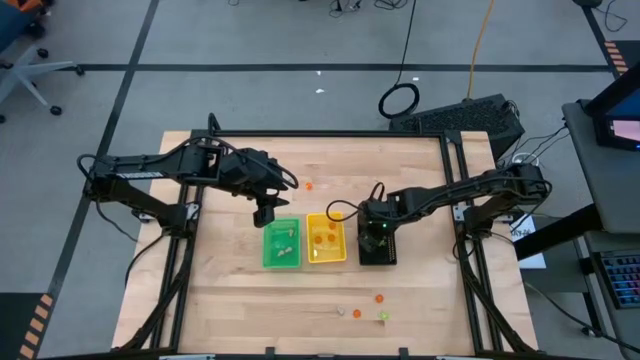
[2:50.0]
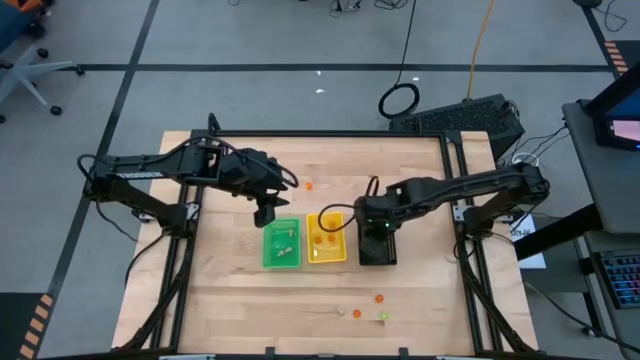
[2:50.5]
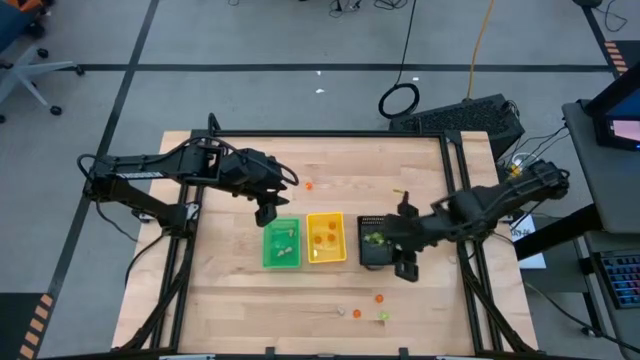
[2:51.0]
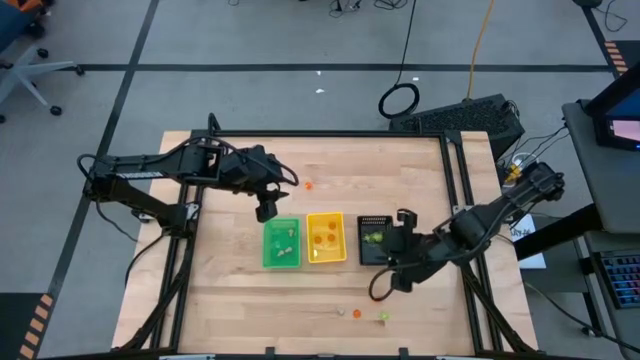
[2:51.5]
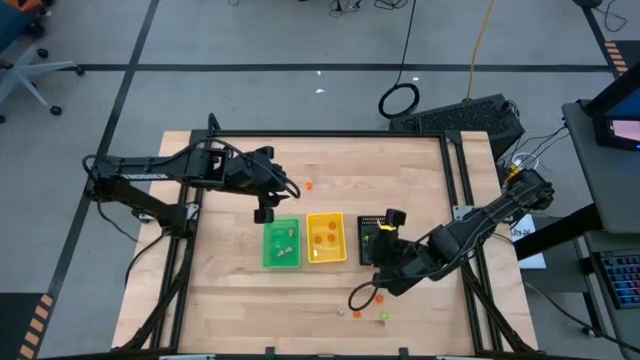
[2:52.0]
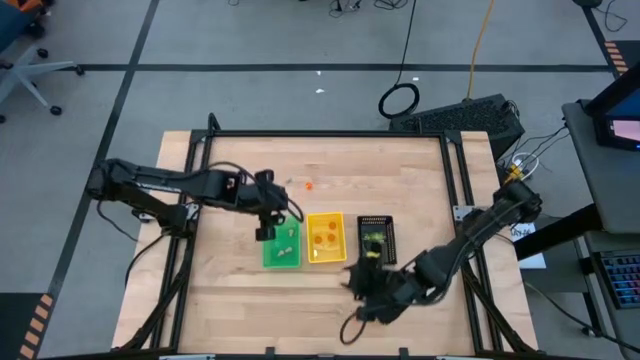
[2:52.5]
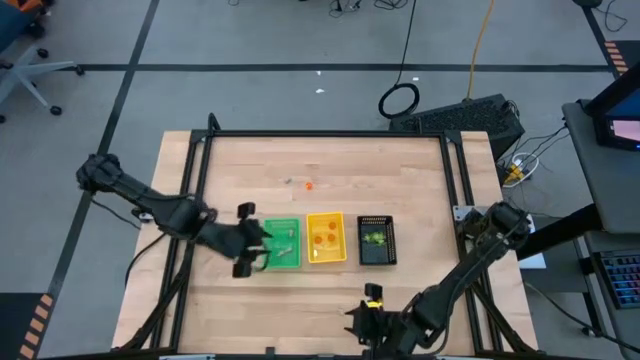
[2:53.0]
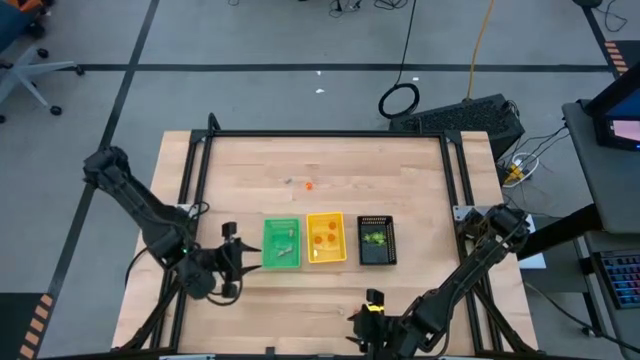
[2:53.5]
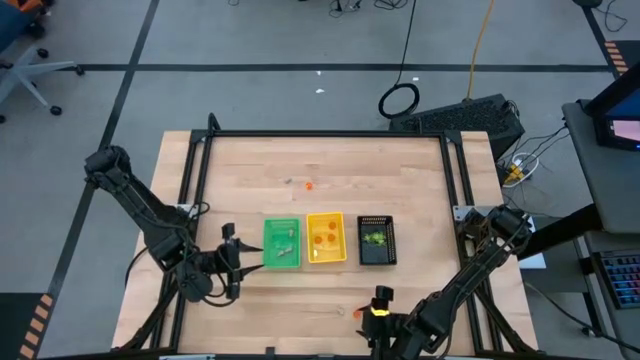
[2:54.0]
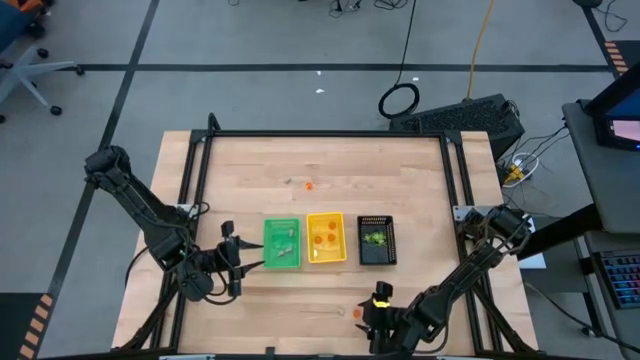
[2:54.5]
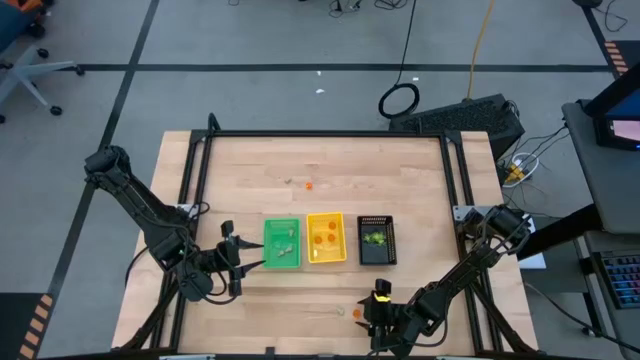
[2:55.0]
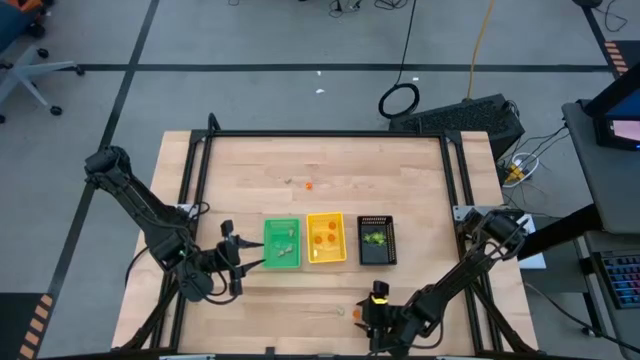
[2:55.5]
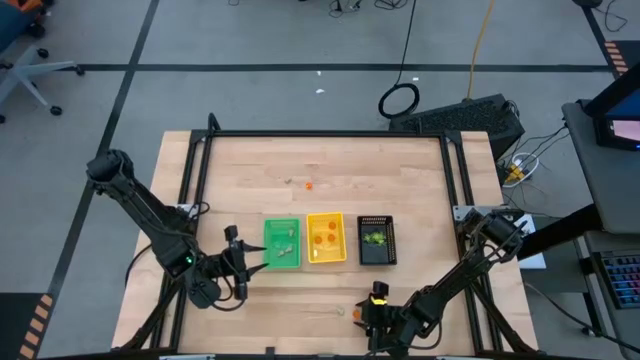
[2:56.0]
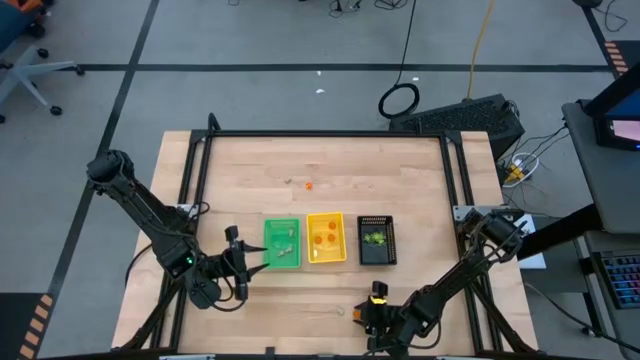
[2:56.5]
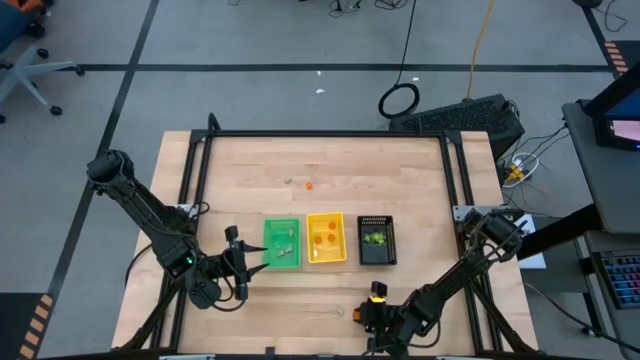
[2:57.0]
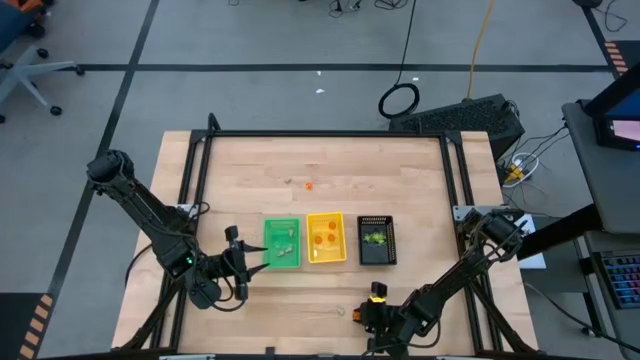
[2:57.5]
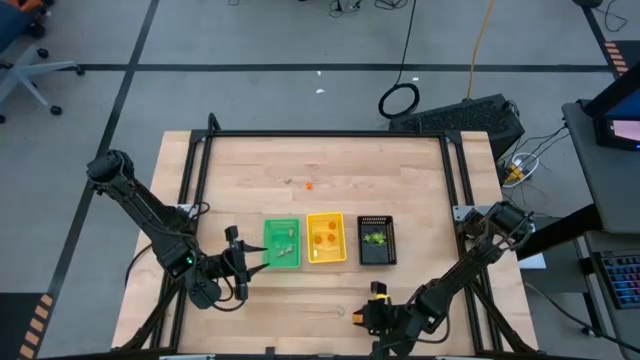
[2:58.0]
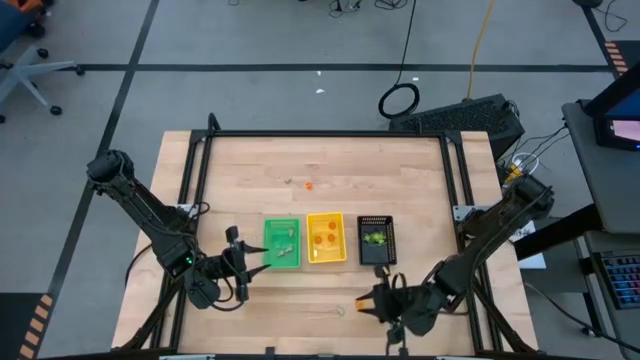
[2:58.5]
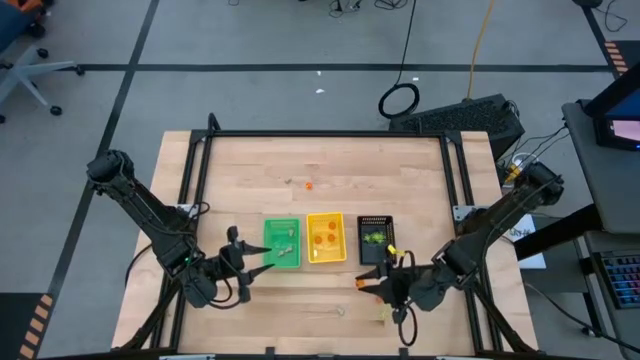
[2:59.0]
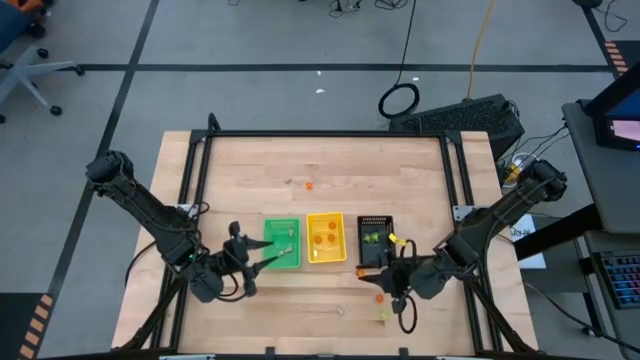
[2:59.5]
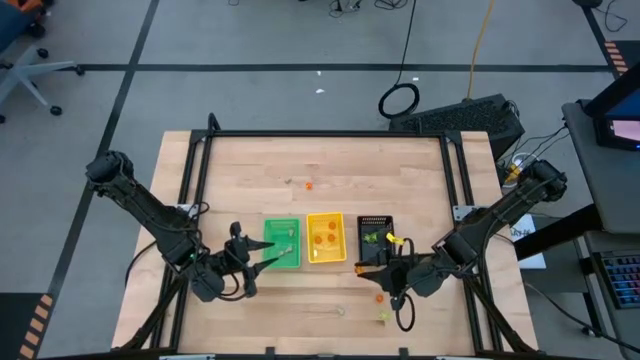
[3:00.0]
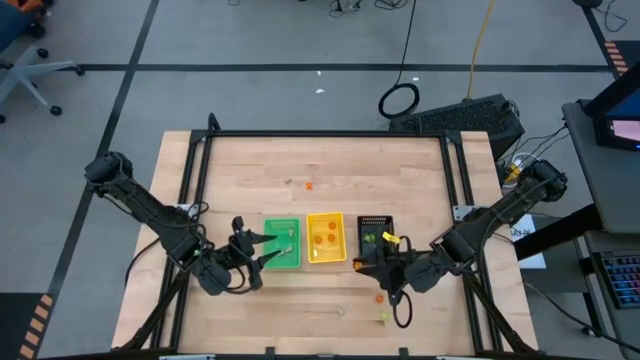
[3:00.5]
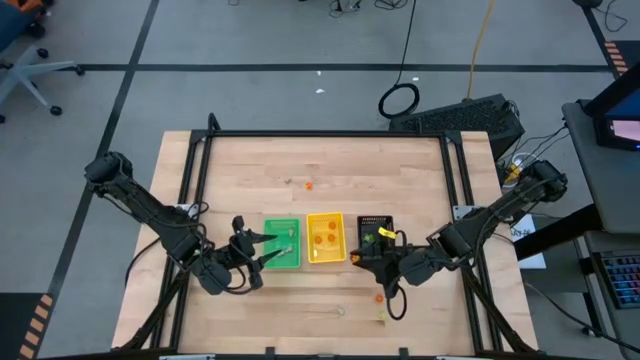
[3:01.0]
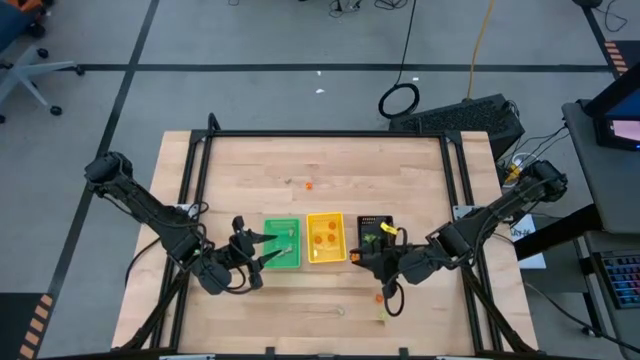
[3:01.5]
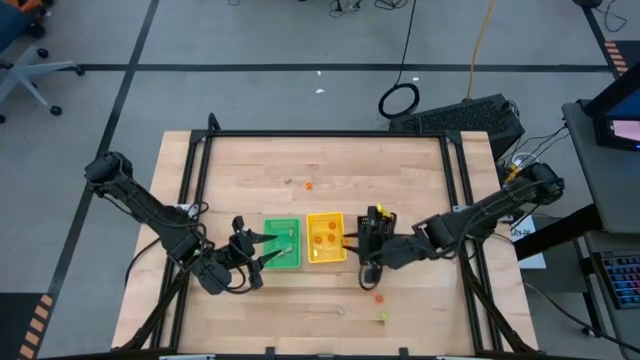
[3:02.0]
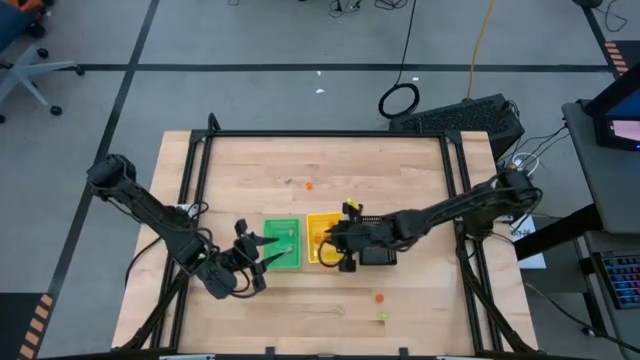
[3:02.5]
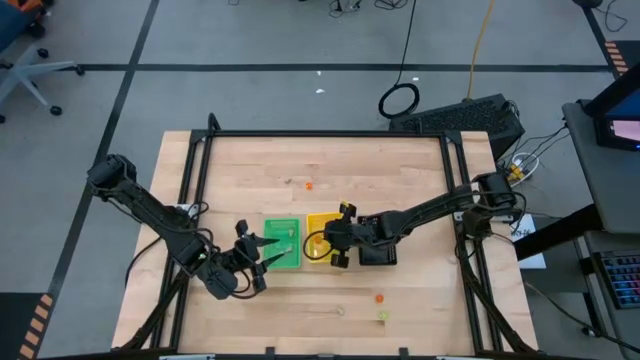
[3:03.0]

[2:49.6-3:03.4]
Task: Sort Halloween decoration
Put the orange pumpkin toy into the yellow basket

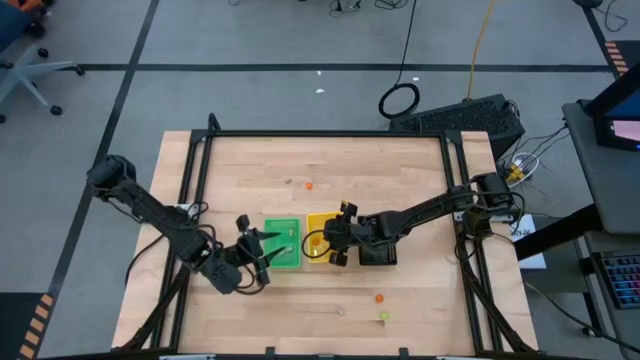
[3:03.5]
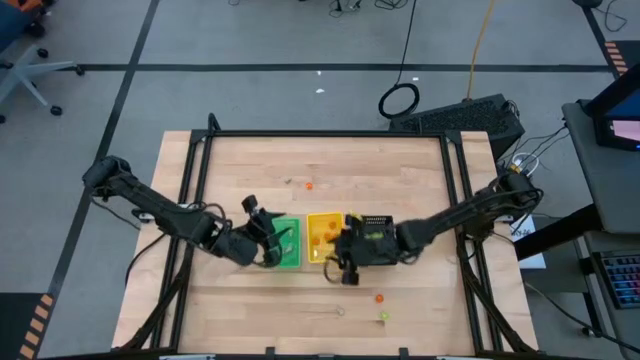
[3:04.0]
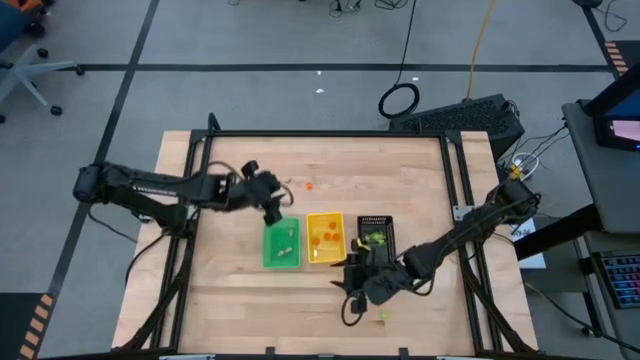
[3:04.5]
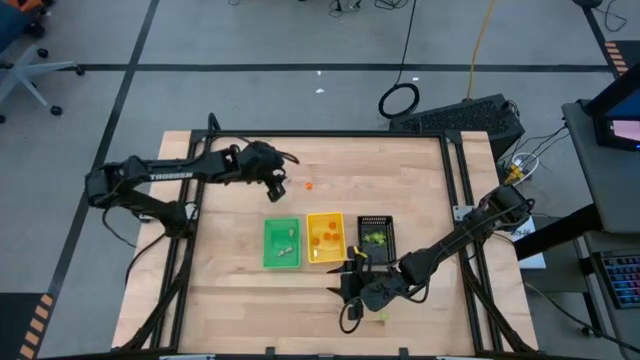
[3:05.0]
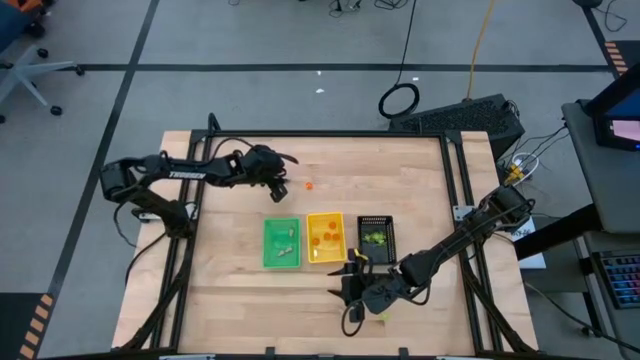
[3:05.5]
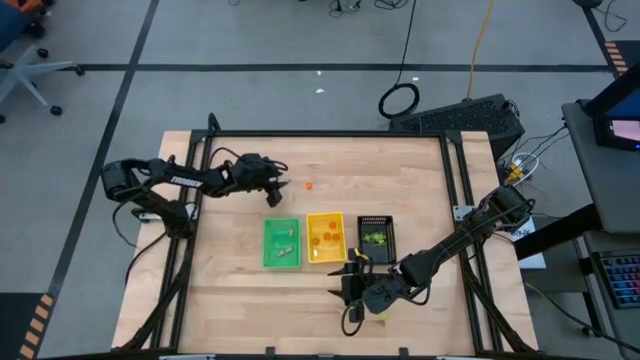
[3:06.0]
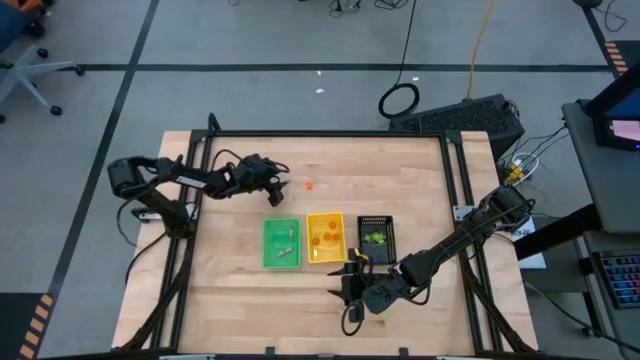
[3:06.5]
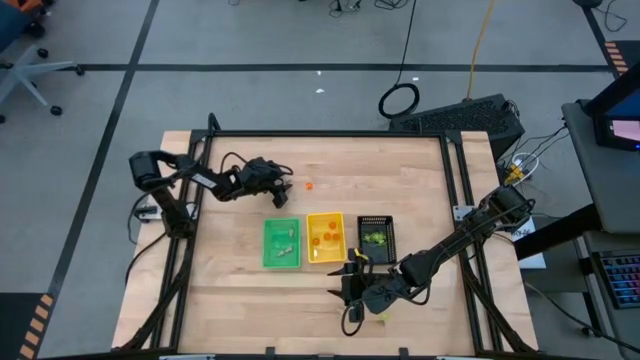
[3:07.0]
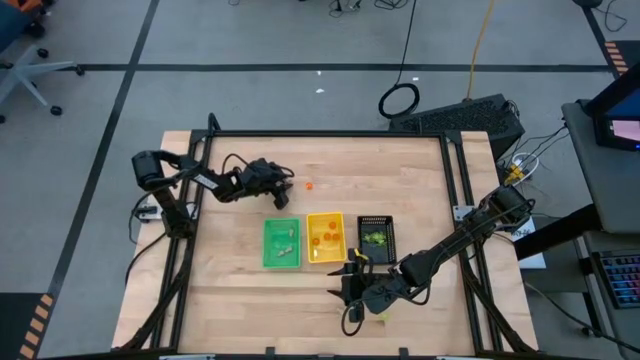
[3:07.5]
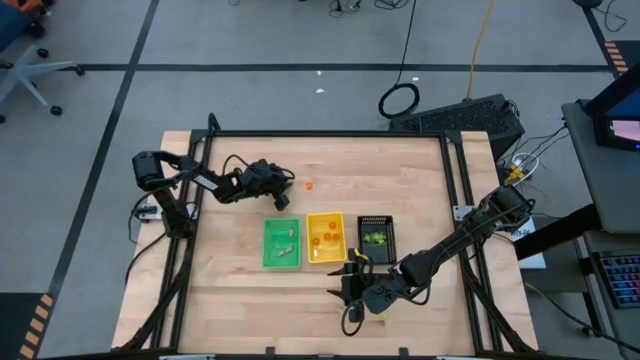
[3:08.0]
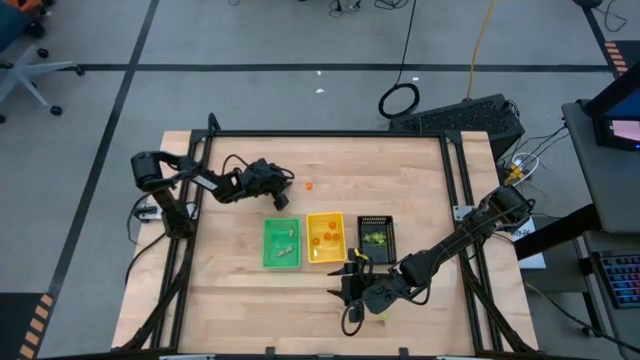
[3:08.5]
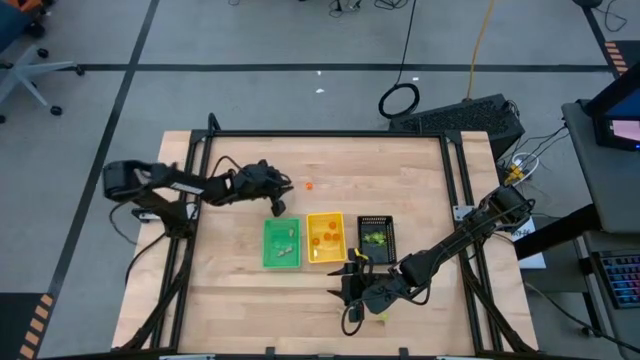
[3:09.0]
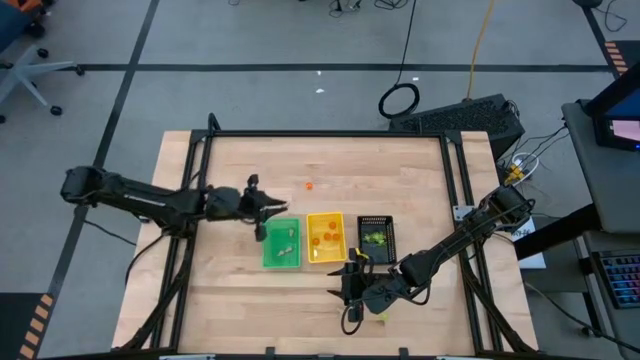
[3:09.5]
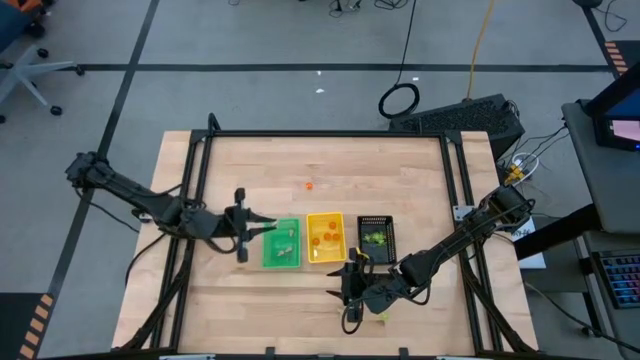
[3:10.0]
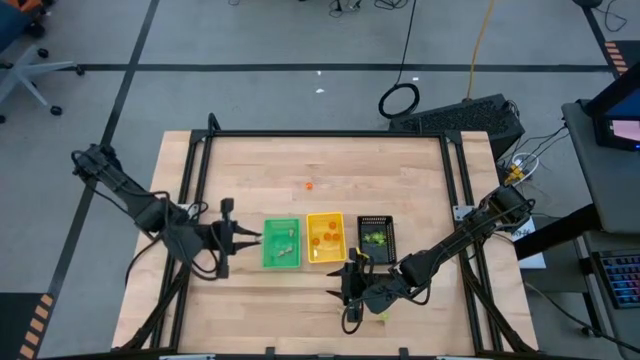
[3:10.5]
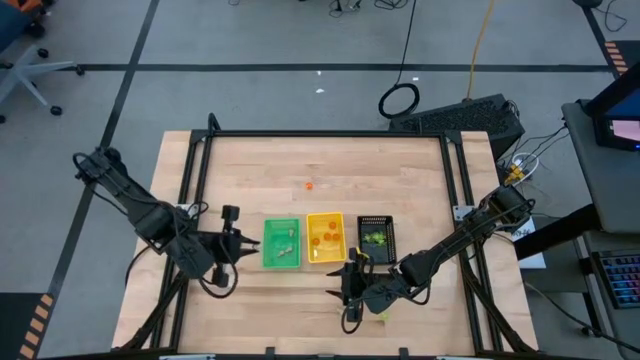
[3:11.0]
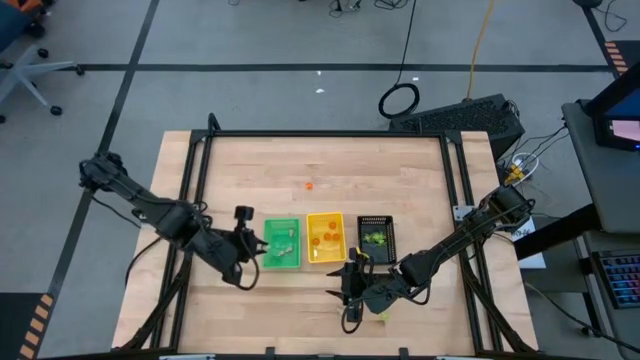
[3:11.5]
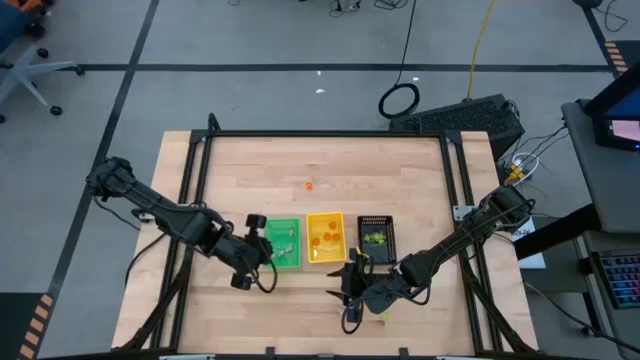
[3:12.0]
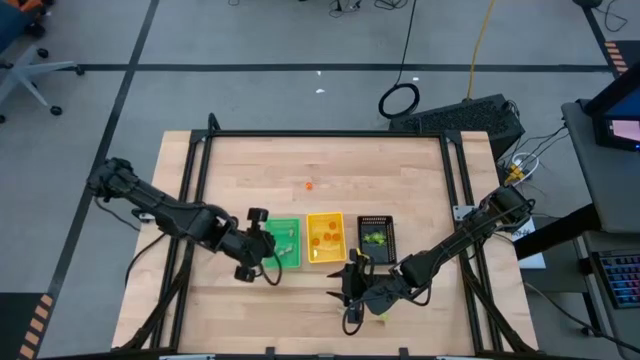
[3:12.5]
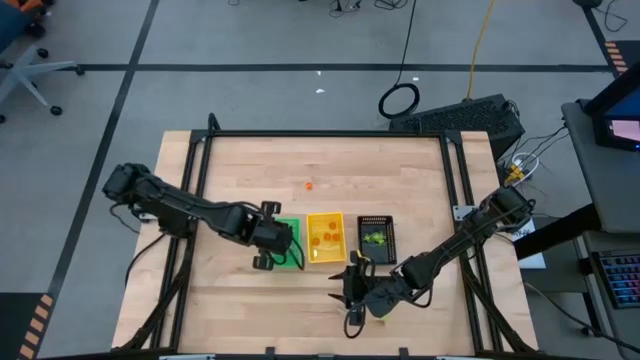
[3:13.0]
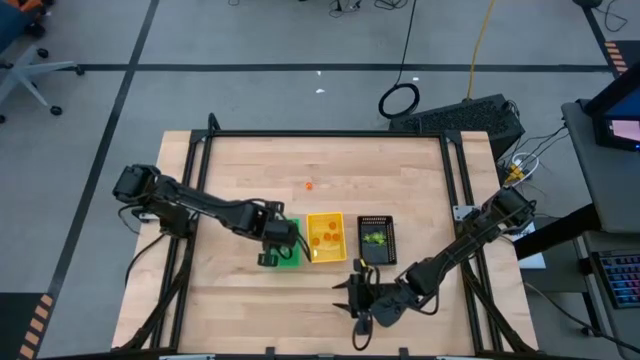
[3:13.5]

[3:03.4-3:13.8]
Put the white skull toy into the green basket
